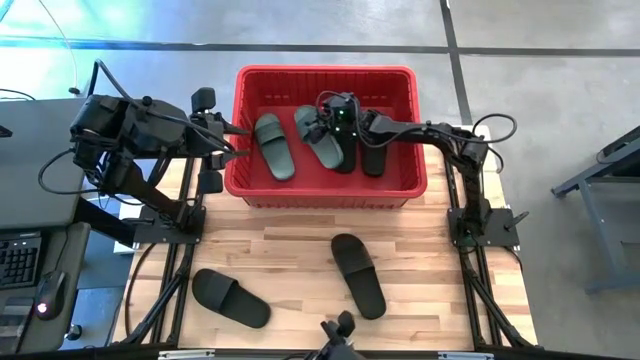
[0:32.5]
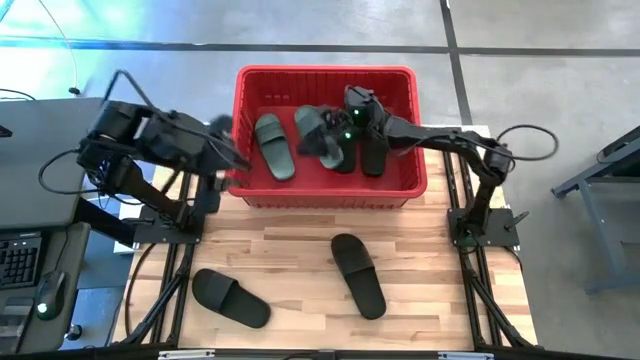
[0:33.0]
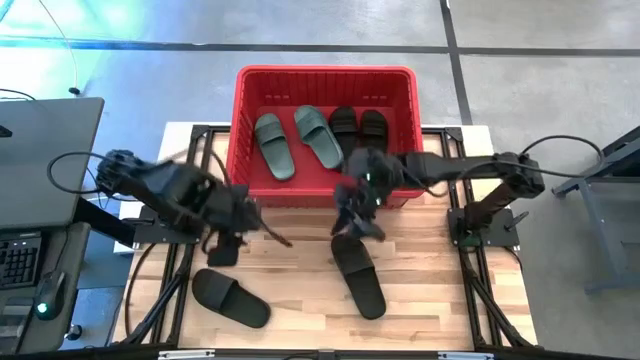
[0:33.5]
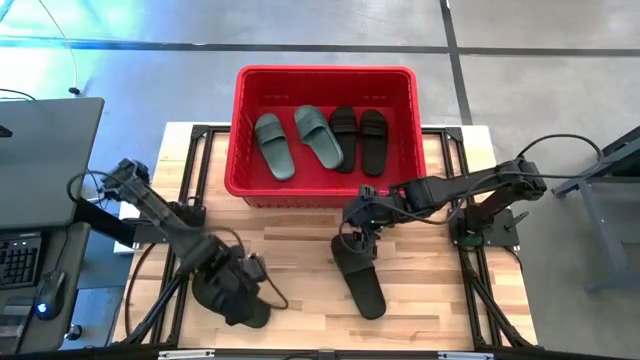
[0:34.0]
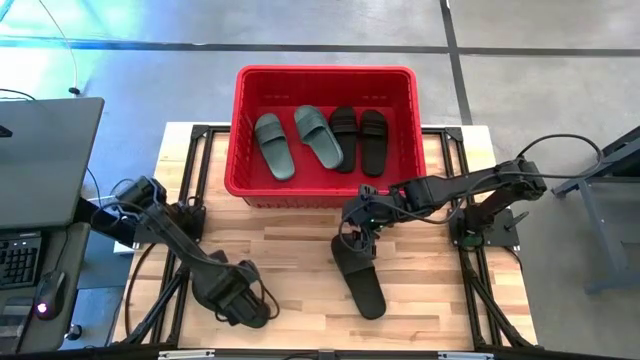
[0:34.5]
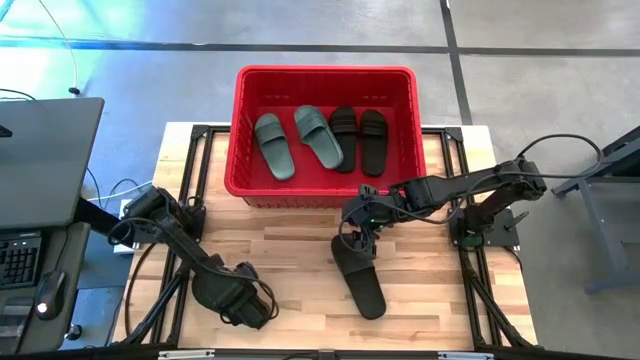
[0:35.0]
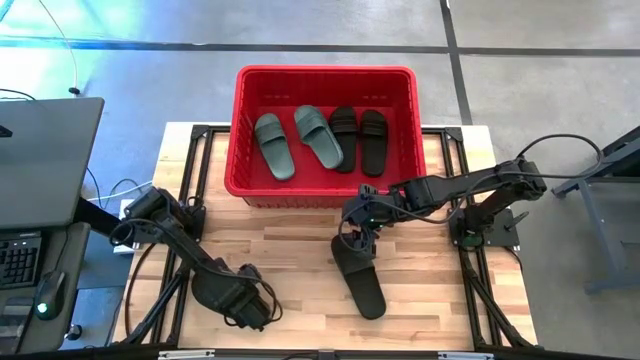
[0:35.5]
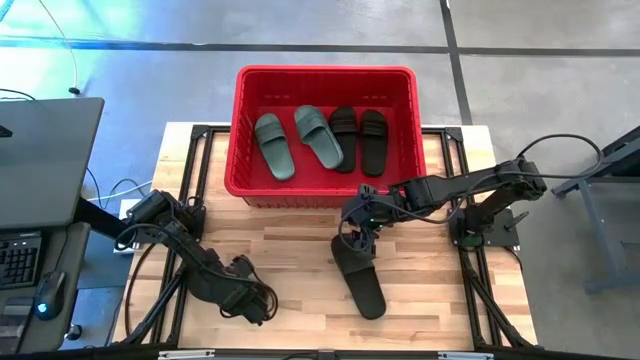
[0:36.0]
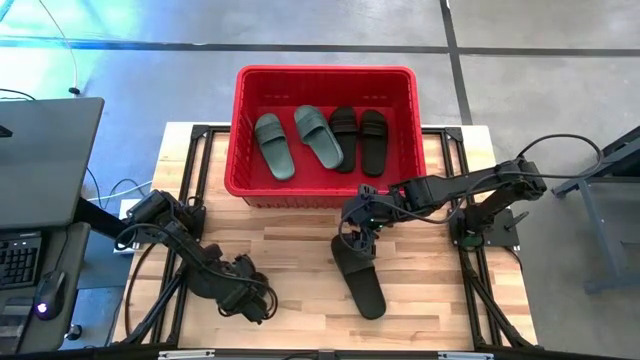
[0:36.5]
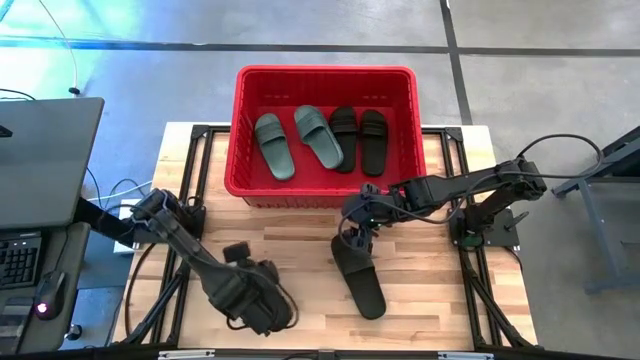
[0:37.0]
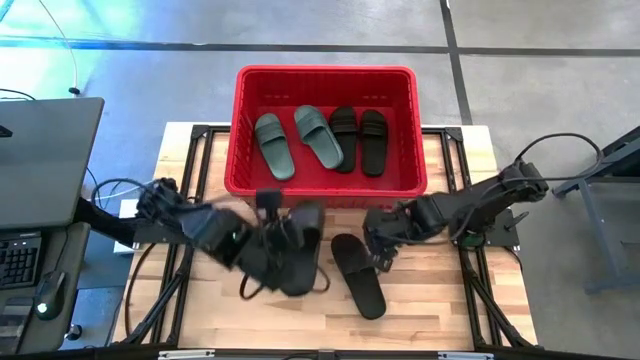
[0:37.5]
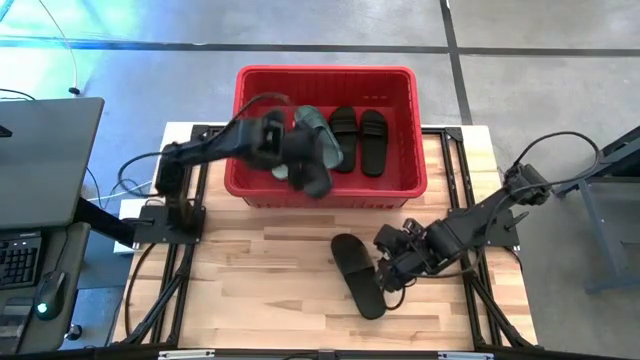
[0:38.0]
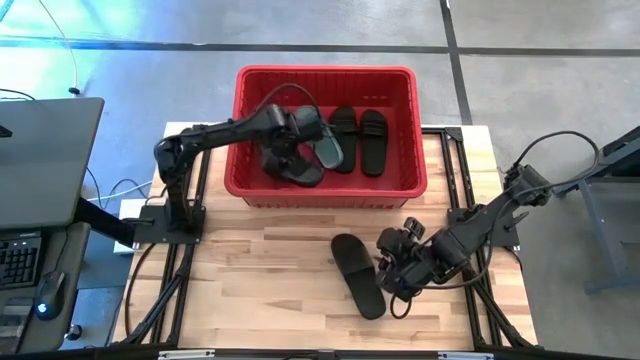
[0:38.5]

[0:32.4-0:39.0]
Task: Pick and place slides into bin
Put the black slide into the red bin

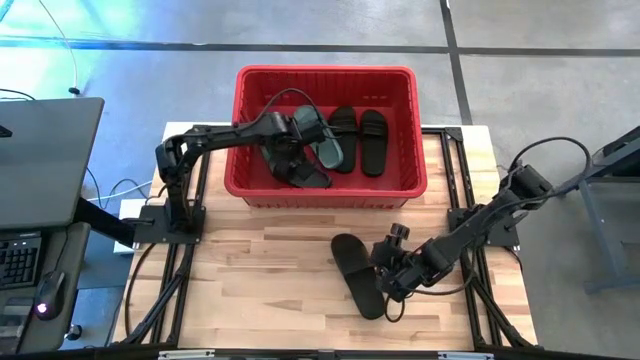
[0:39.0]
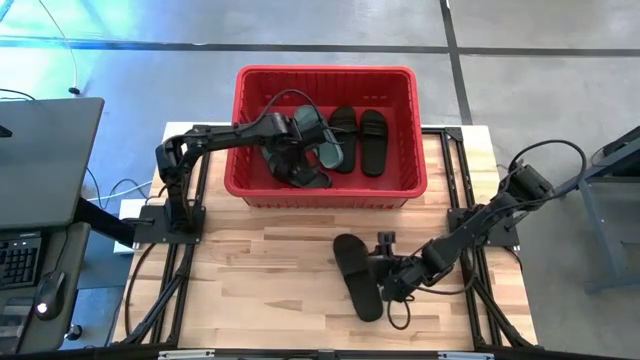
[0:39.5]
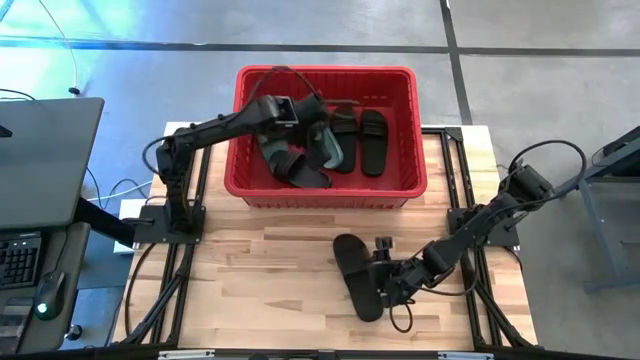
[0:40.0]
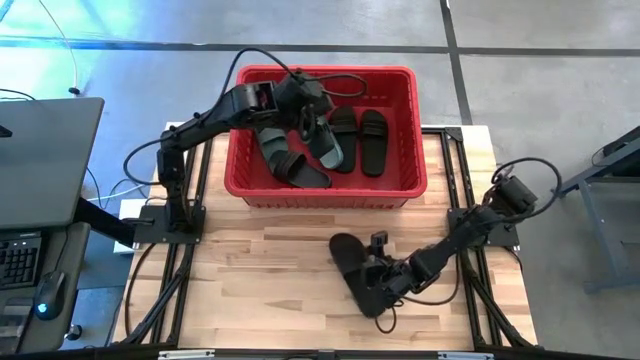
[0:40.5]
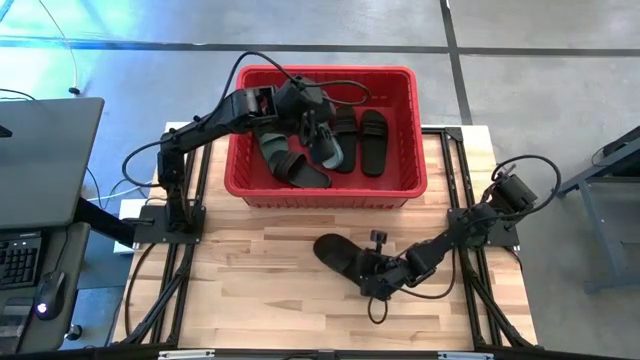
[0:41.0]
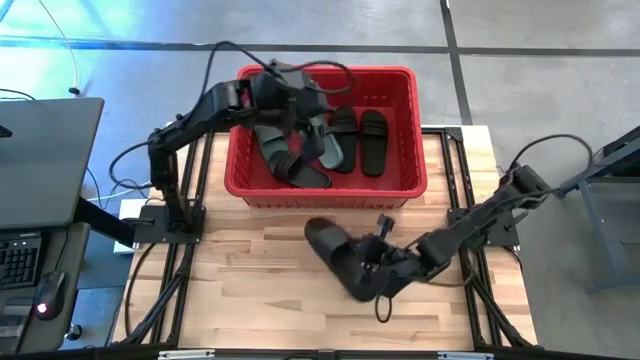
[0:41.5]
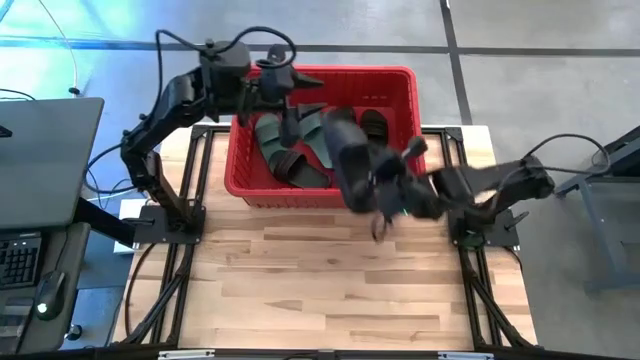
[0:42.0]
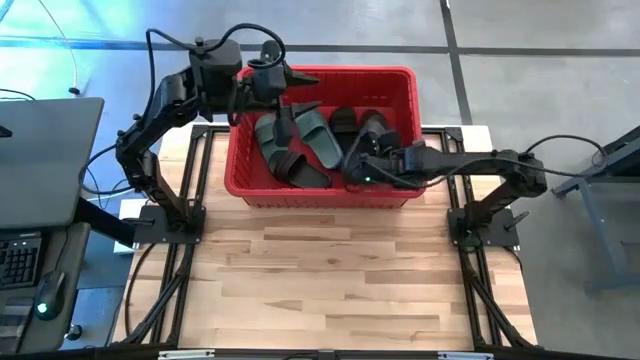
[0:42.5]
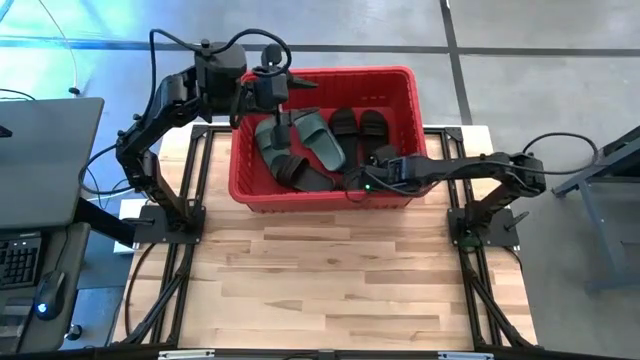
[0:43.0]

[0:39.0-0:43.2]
Put the black slide into the red bin

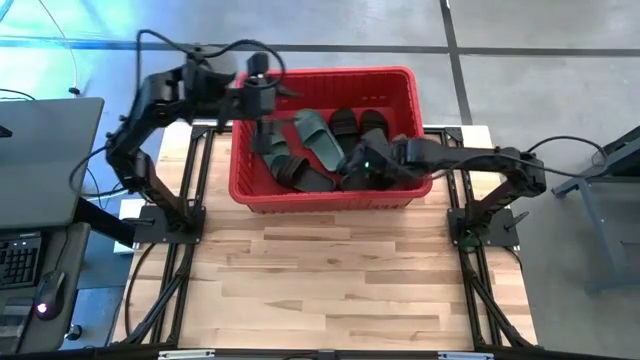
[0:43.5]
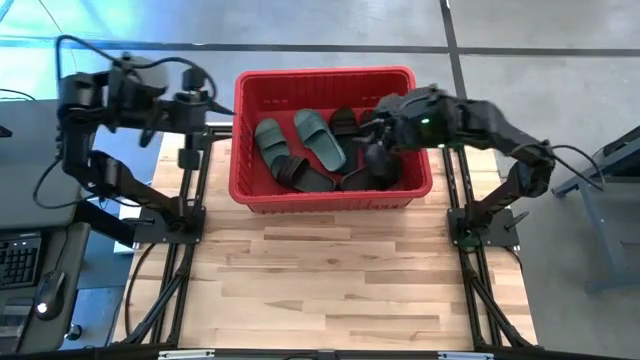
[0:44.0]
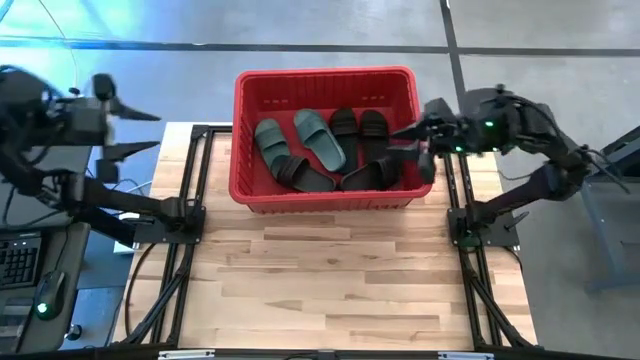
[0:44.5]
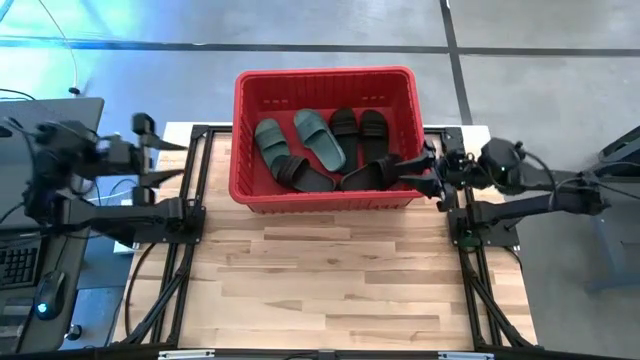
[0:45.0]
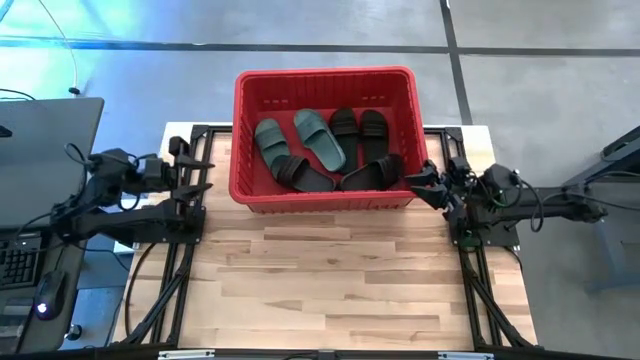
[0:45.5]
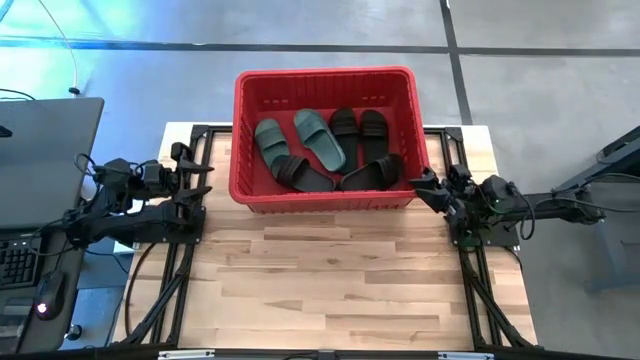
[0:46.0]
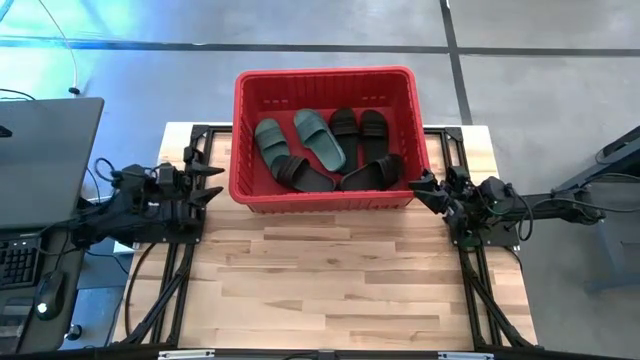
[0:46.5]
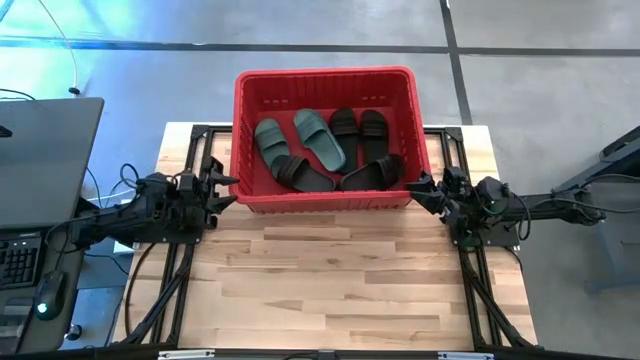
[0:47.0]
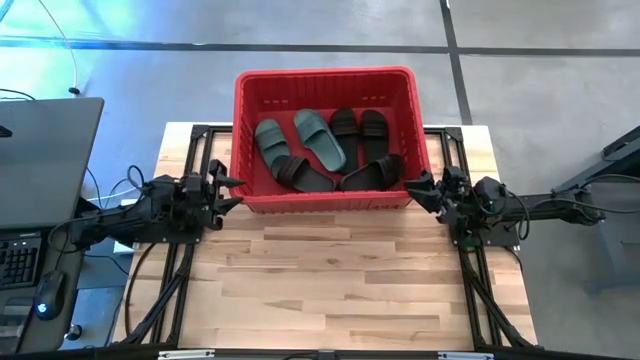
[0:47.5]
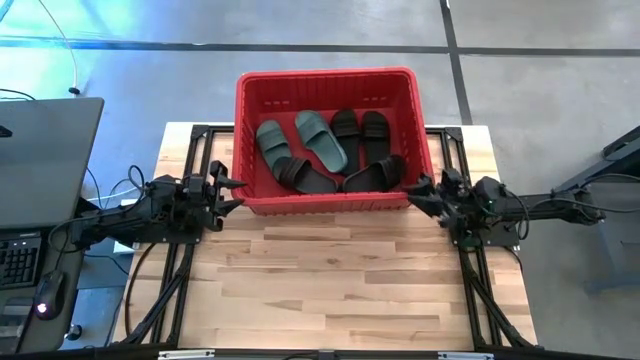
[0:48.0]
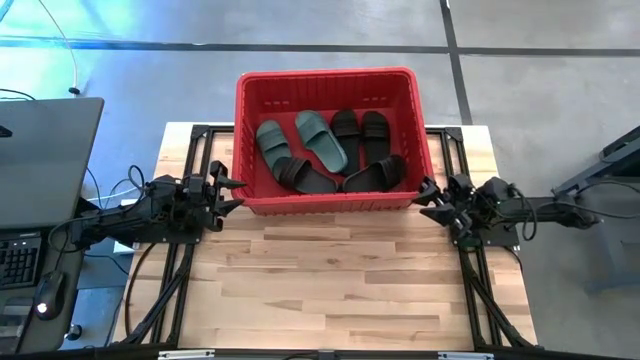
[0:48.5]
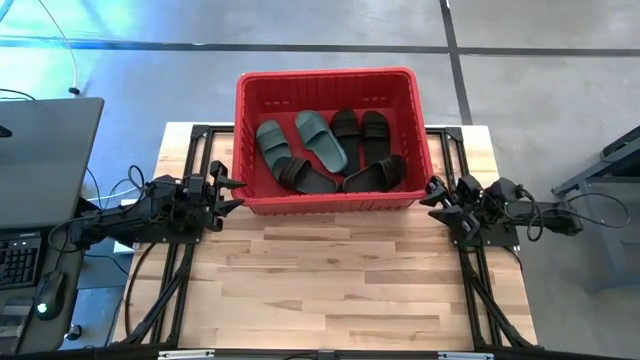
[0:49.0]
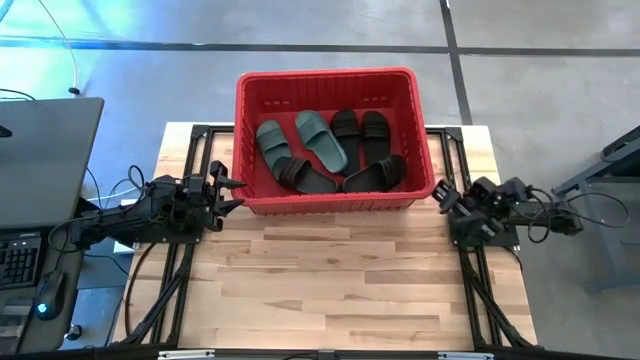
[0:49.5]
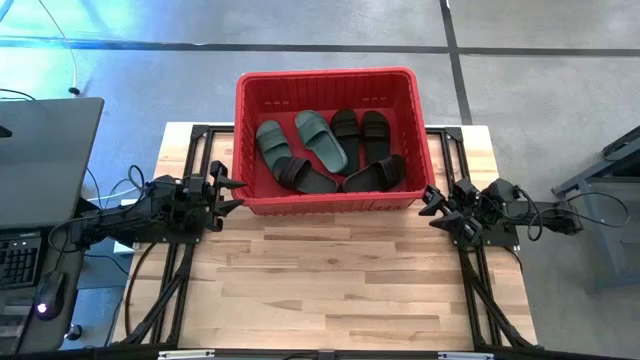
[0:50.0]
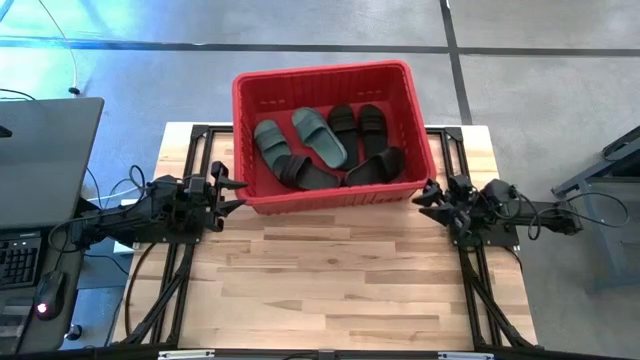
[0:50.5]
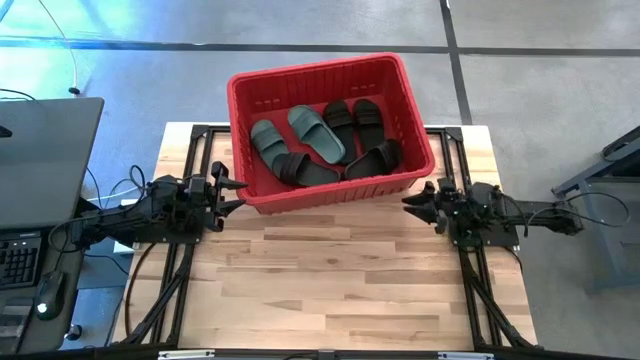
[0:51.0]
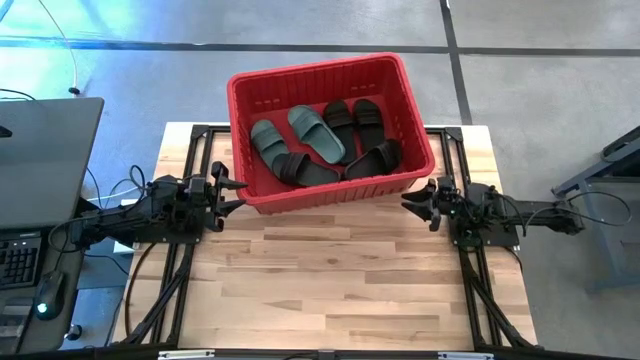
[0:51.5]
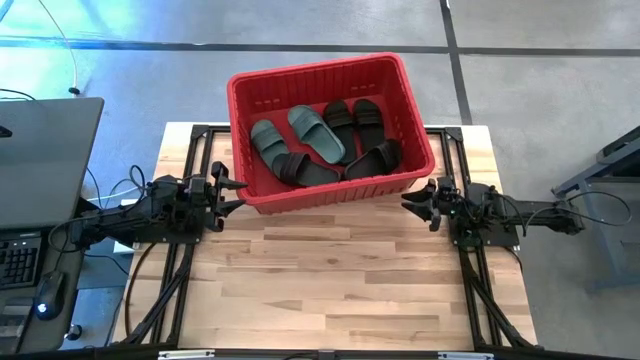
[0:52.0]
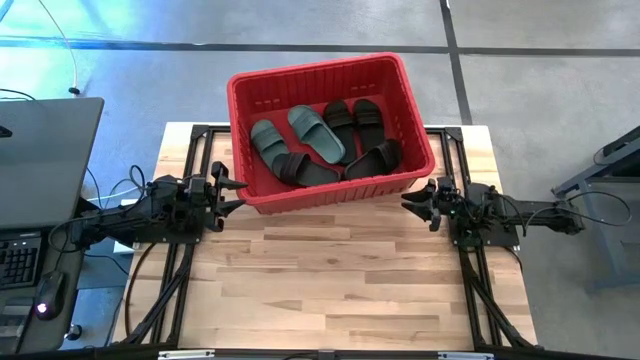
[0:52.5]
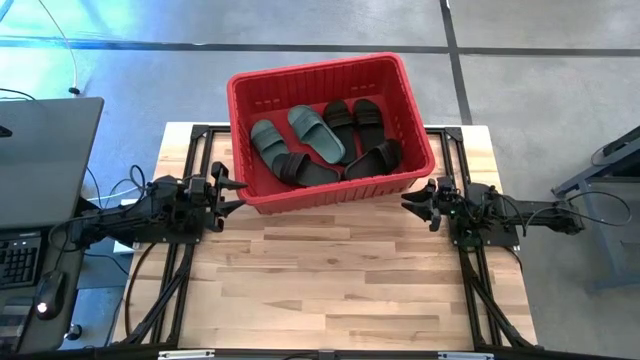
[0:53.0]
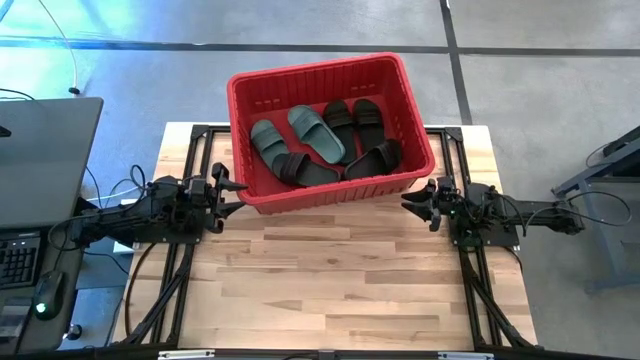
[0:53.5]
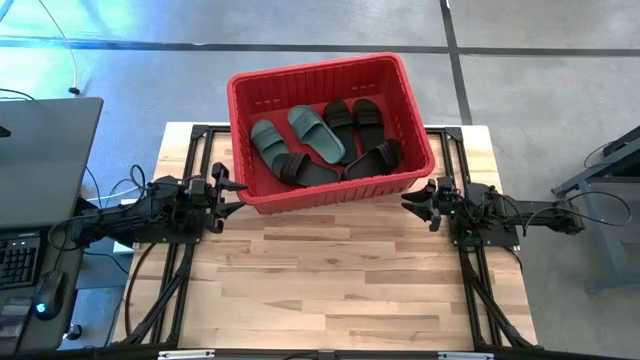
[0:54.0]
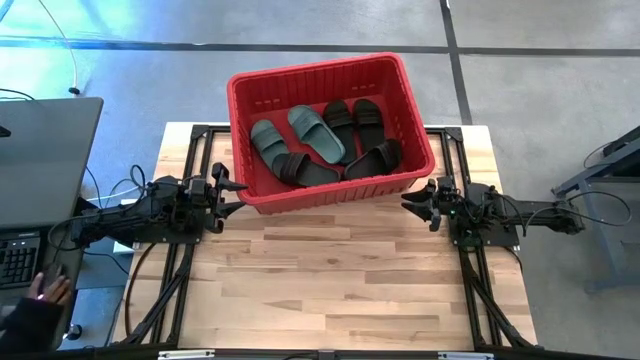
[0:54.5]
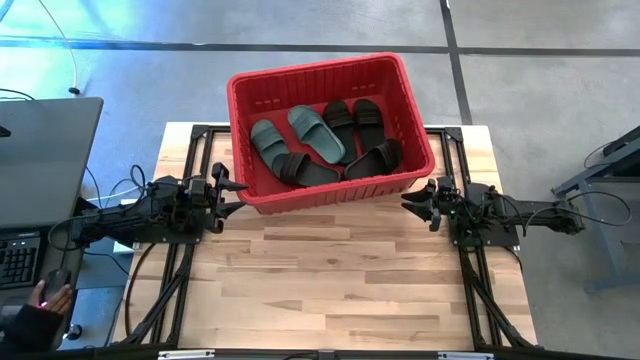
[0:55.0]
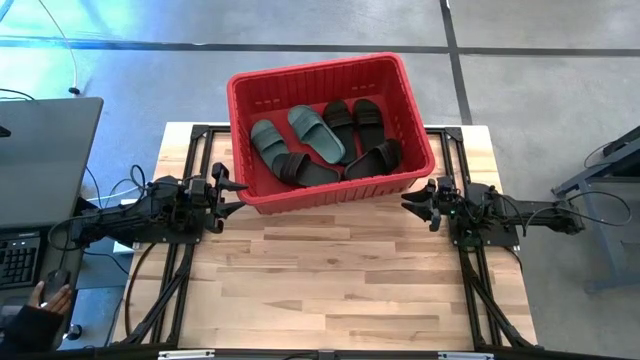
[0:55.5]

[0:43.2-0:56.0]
Return to Home Position
